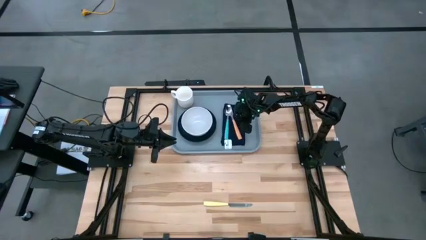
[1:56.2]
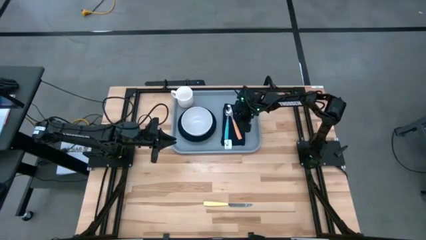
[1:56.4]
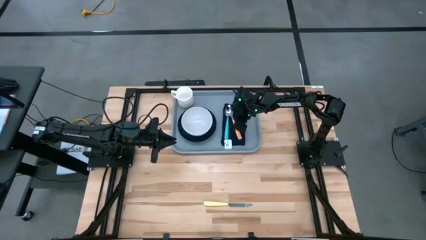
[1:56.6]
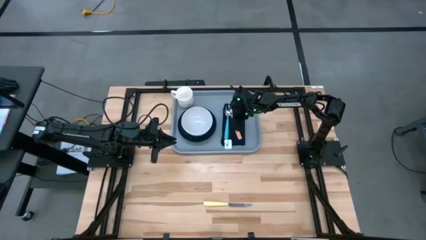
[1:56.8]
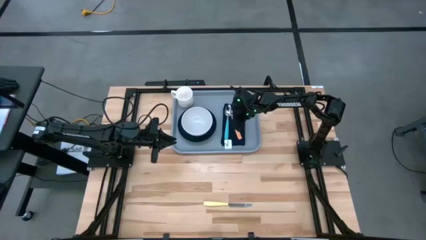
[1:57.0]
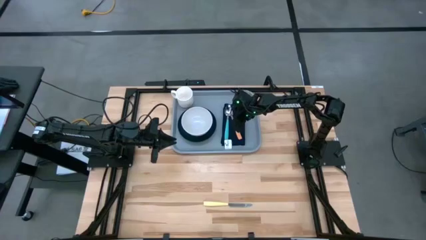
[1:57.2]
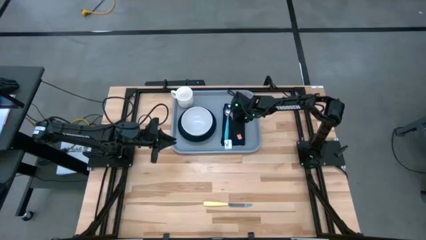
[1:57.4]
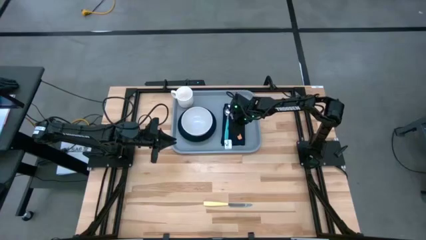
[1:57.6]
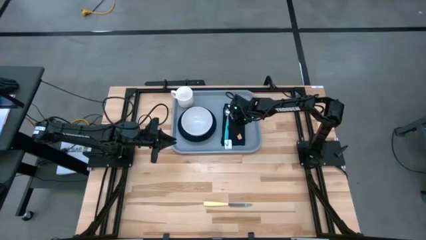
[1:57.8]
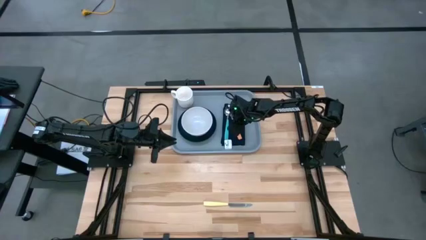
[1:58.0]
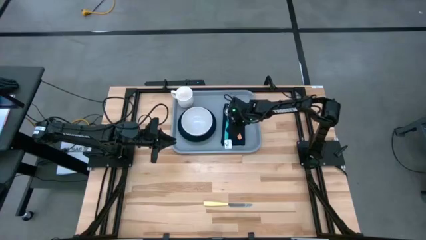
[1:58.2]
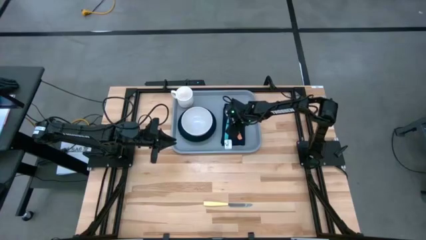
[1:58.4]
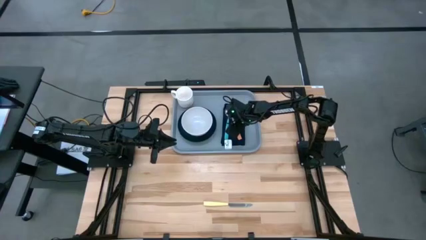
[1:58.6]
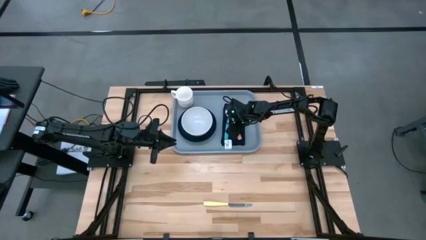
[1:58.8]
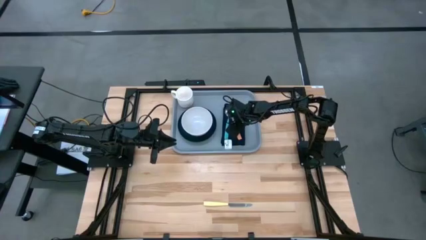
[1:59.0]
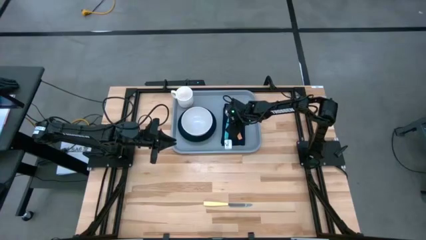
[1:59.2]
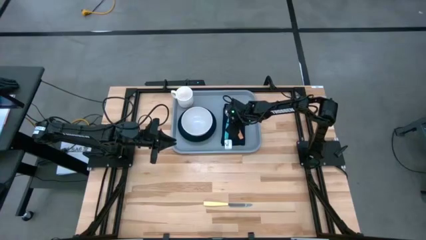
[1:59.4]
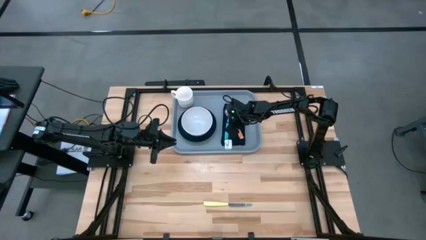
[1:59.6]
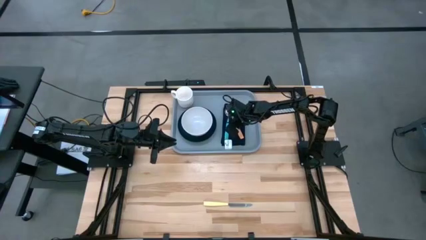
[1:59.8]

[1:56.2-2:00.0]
Task: Set up tray
Adjust the orange fork

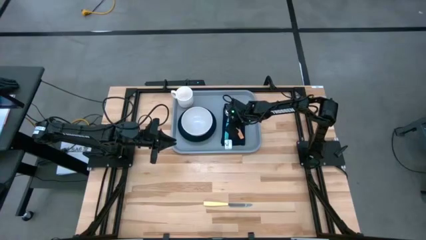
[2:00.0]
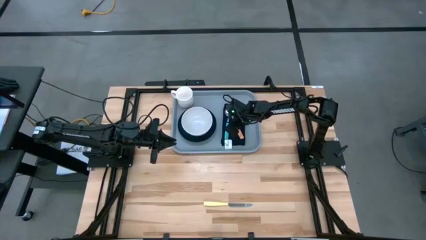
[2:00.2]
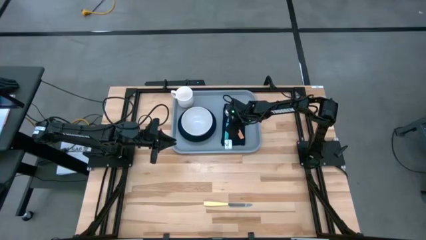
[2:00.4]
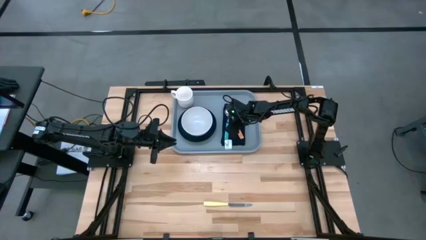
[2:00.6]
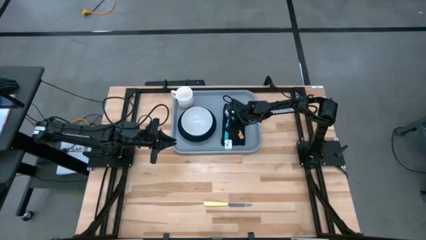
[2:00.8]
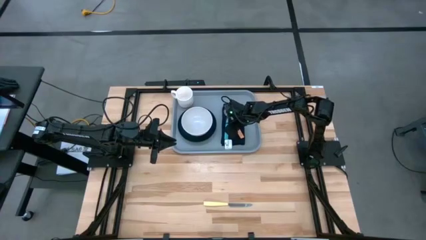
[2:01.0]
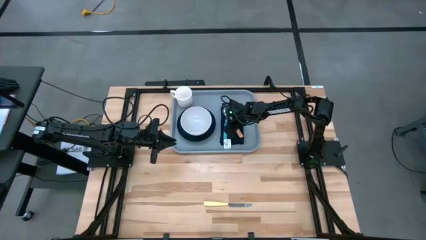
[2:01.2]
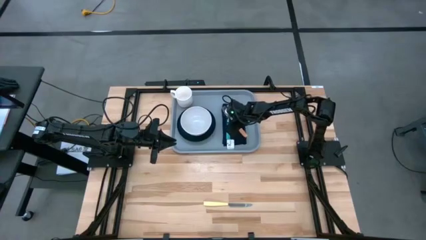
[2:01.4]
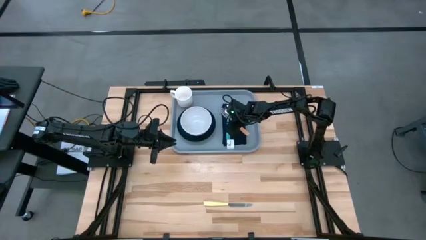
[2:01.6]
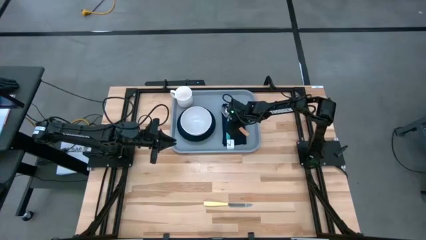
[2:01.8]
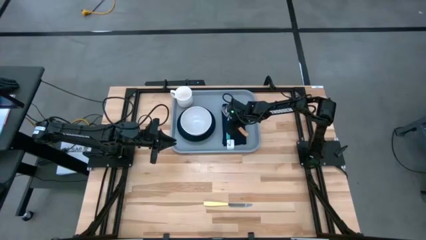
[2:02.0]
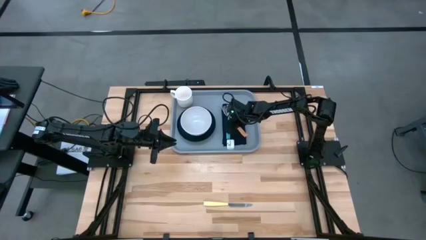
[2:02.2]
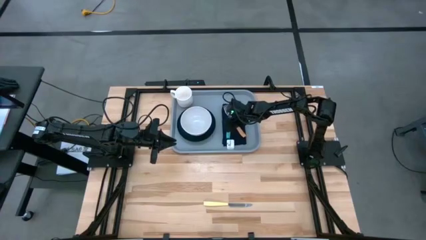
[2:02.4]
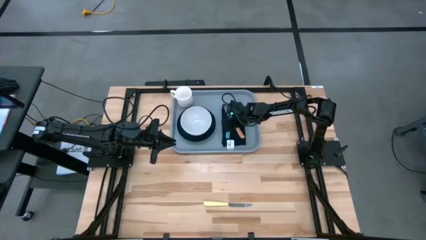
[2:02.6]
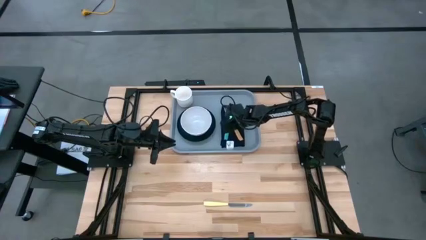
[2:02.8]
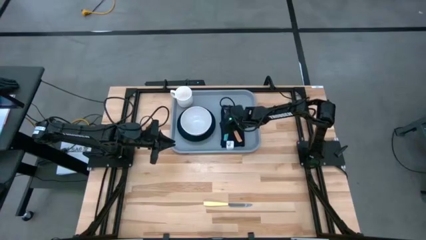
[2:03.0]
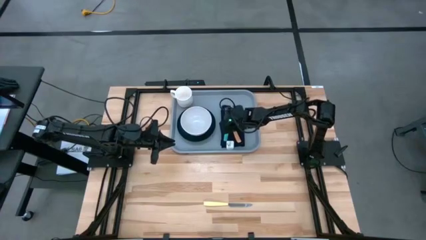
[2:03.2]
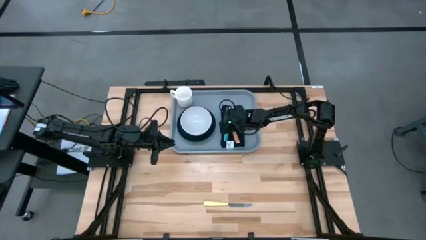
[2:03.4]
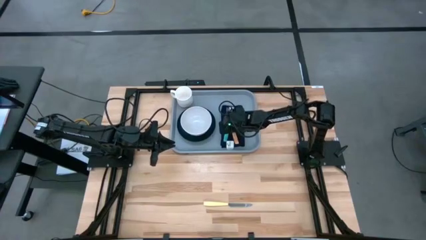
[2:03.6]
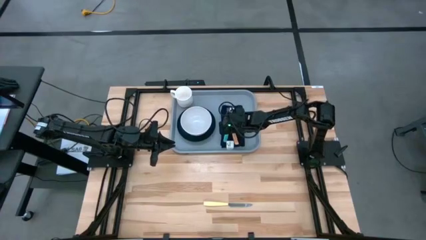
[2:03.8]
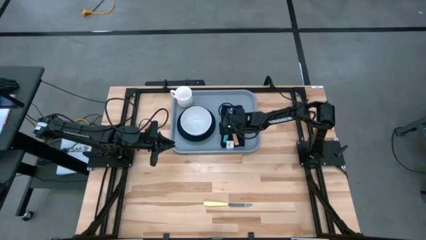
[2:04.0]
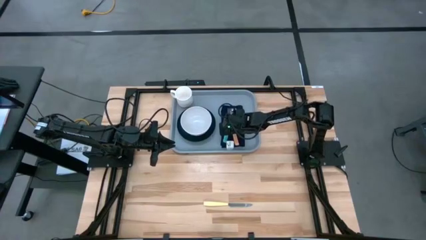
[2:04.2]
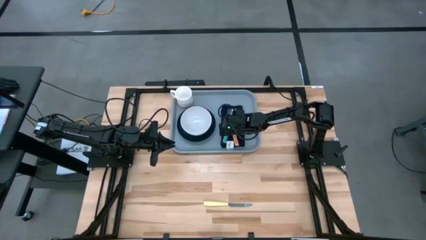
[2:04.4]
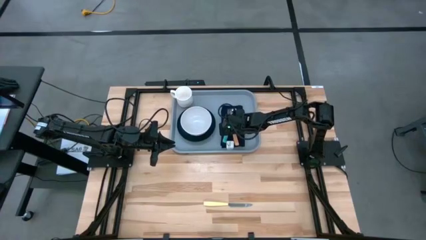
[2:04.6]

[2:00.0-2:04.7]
Adjust the orange fork

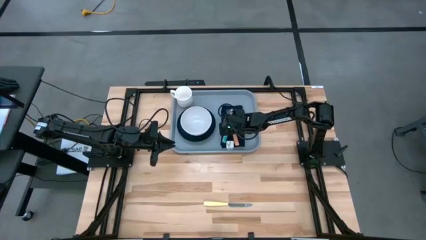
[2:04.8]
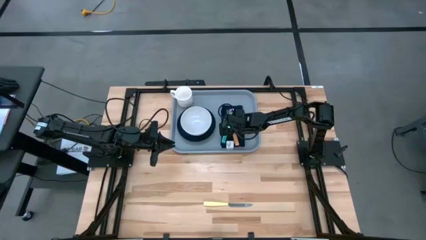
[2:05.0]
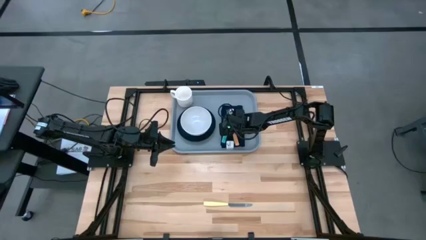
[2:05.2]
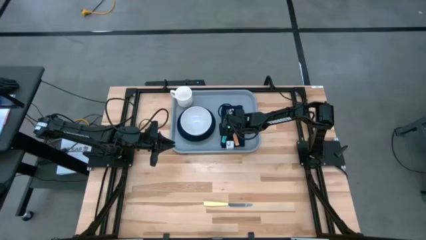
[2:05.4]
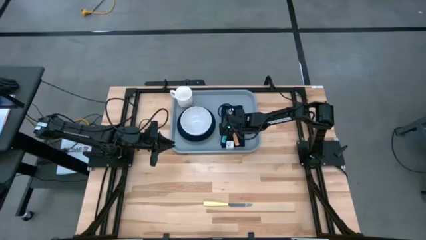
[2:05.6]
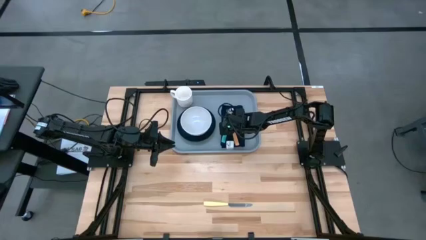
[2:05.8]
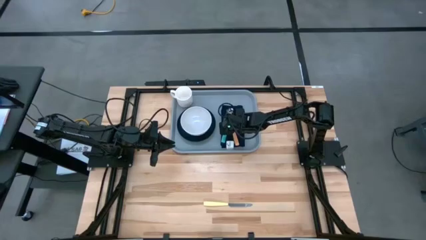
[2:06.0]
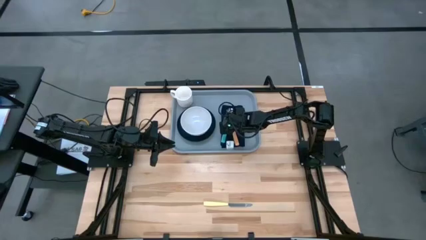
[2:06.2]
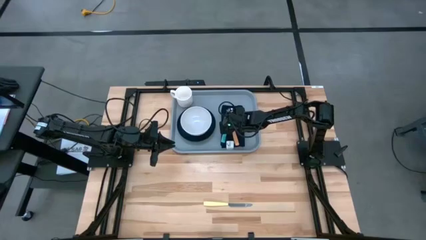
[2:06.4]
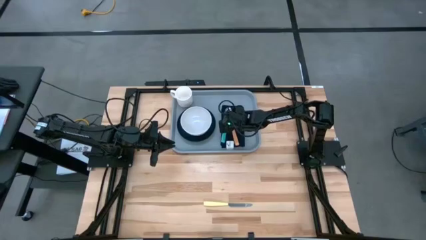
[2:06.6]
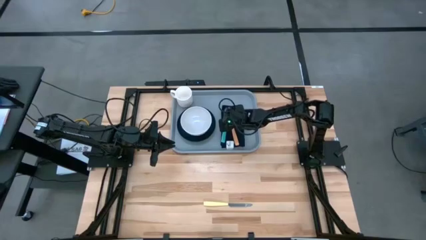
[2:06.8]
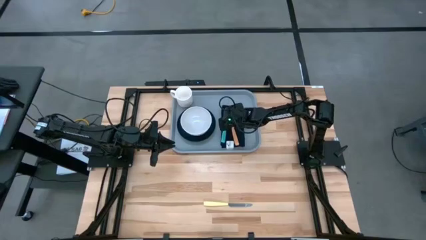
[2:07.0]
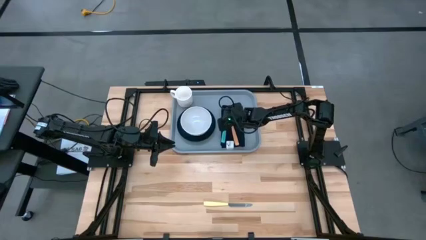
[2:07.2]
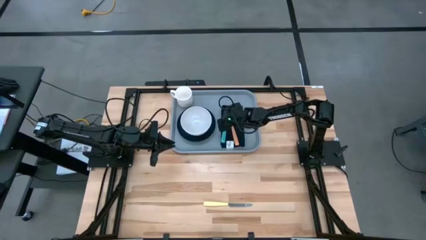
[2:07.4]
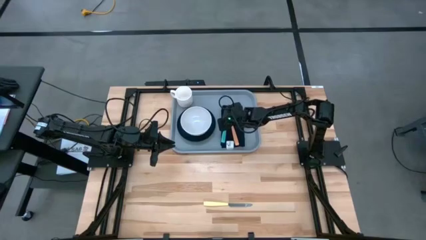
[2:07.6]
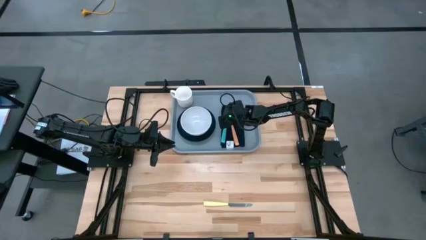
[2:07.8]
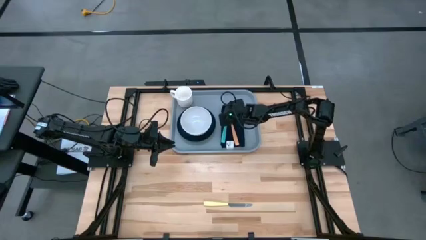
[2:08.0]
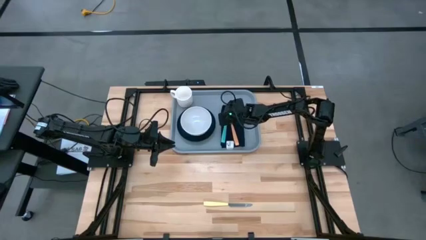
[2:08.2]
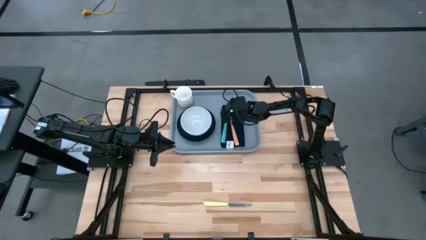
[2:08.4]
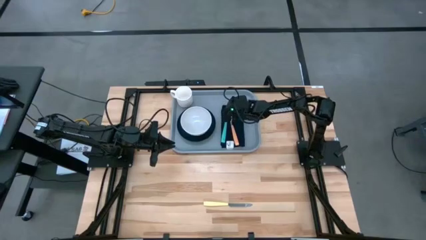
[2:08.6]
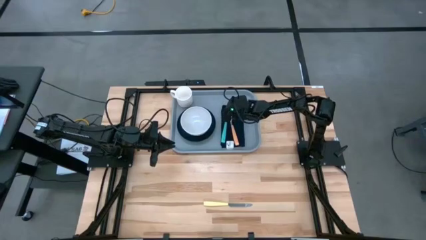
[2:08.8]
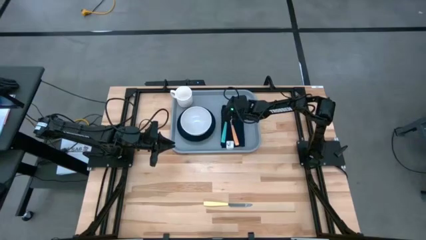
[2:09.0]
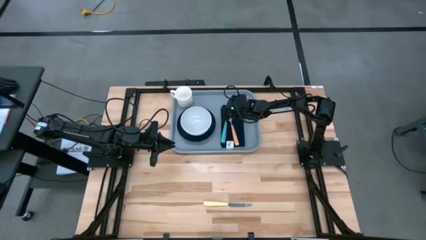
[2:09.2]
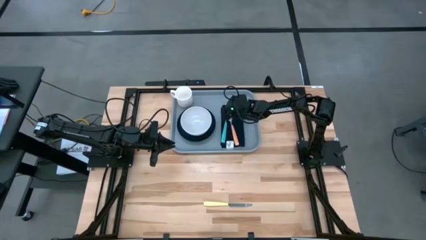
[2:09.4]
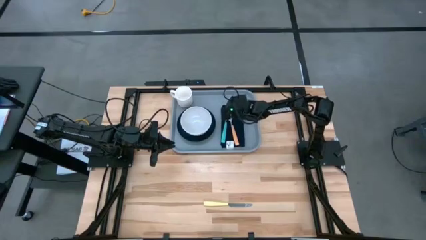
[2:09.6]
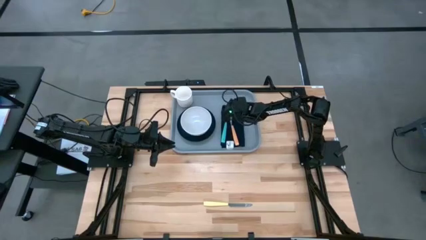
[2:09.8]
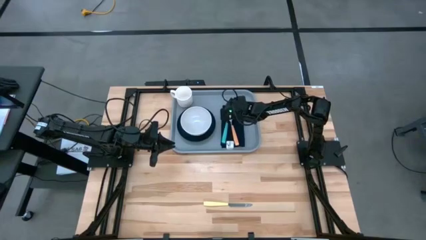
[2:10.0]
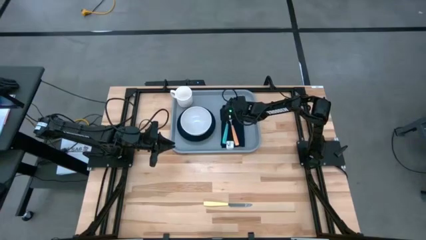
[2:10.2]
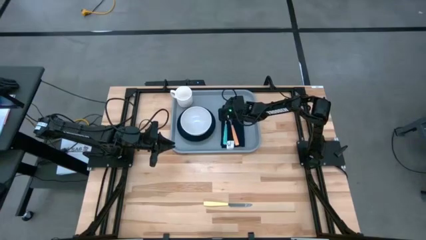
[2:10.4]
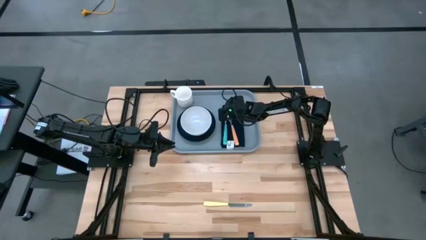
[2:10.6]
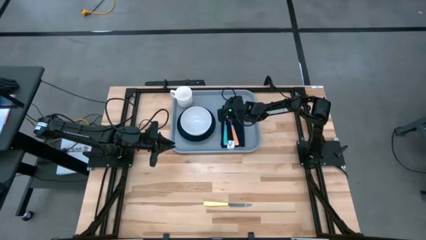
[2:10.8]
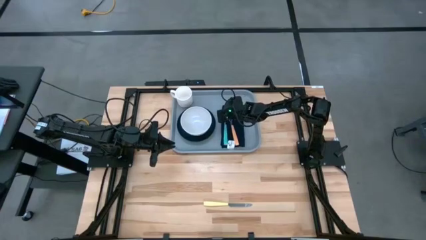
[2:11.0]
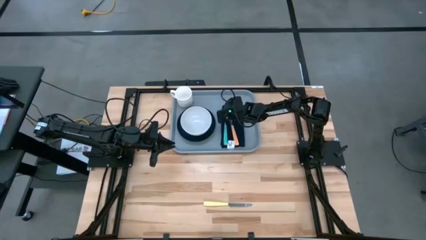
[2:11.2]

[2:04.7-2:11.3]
Adjust the blue spoon

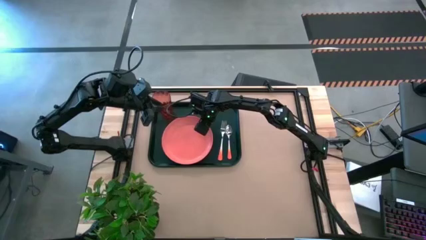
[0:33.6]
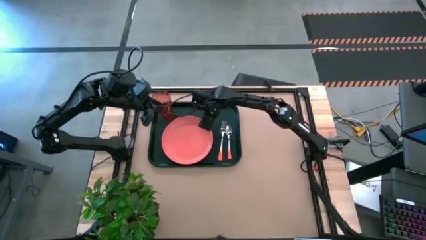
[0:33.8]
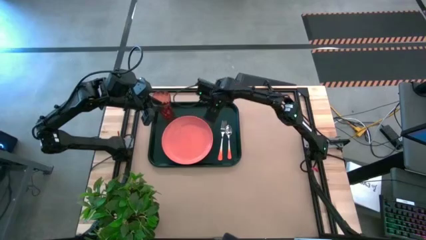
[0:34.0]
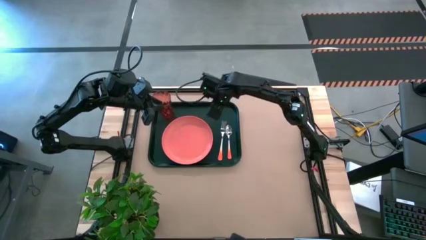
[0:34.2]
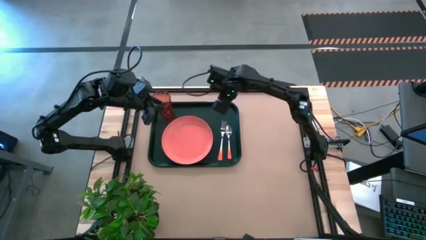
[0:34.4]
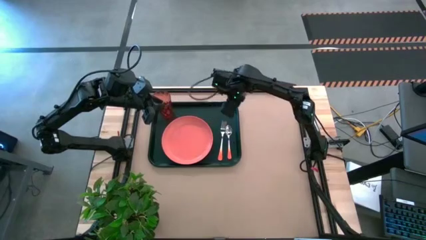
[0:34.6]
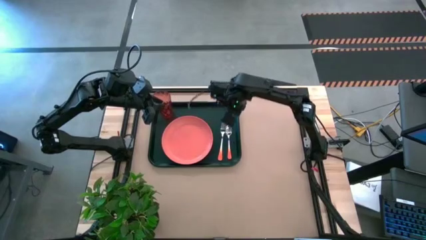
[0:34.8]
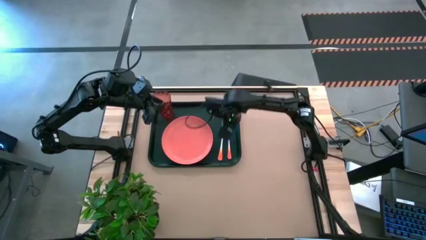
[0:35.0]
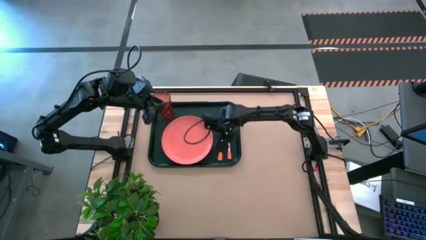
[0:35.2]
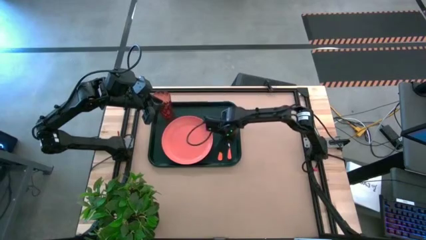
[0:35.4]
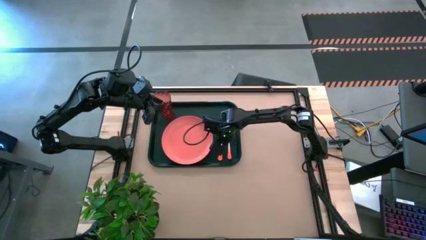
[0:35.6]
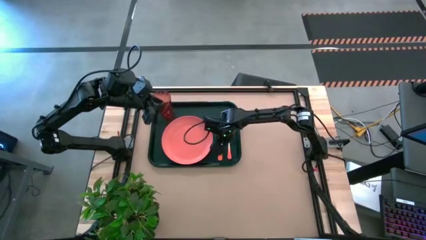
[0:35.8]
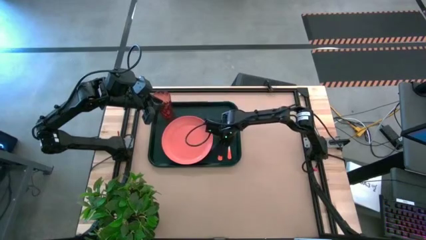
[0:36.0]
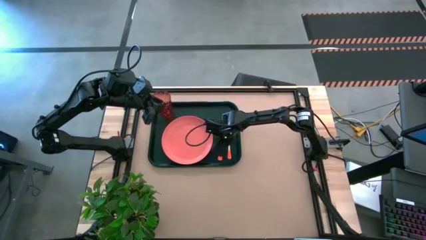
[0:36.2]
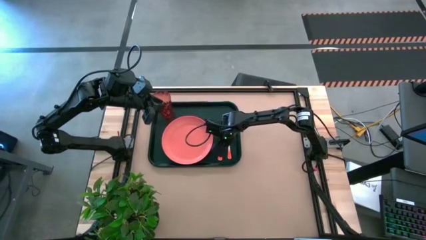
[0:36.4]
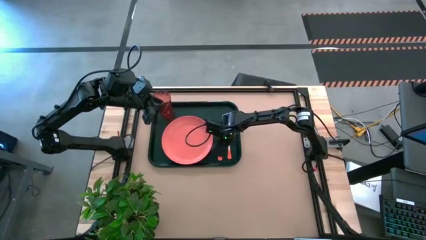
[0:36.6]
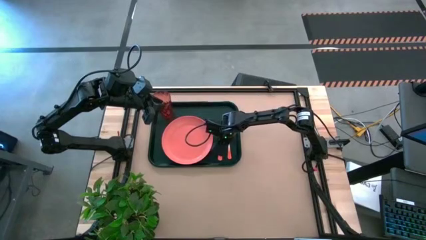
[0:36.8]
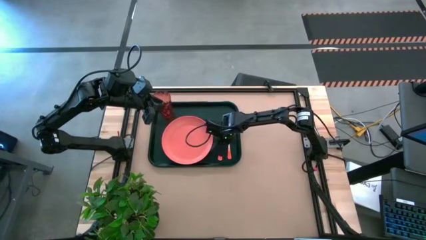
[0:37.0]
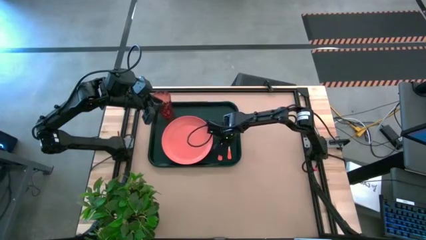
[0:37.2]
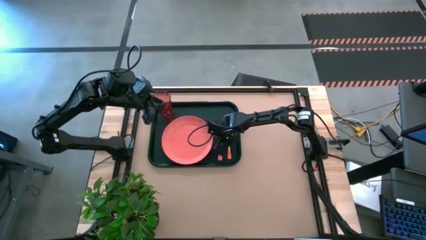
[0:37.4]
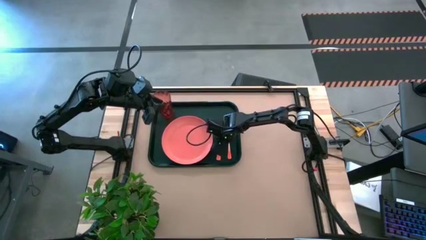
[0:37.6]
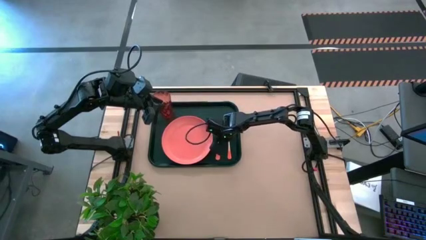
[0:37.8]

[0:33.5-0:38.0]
Task: Pick and place plate/cup/fork/spoon on tray
Adjust the orange fork on the black table tray
